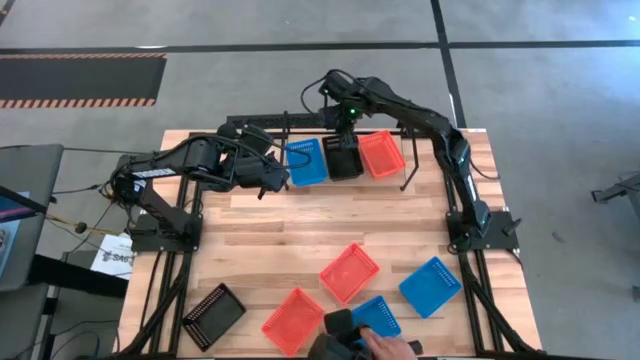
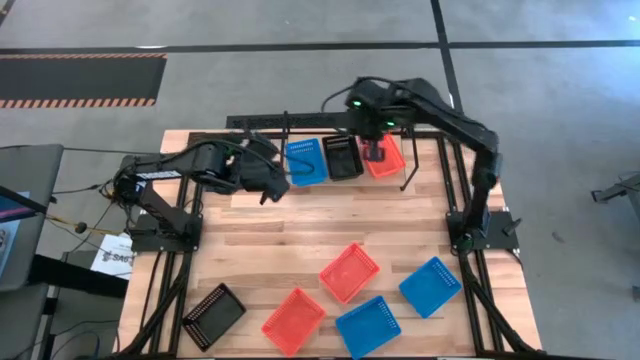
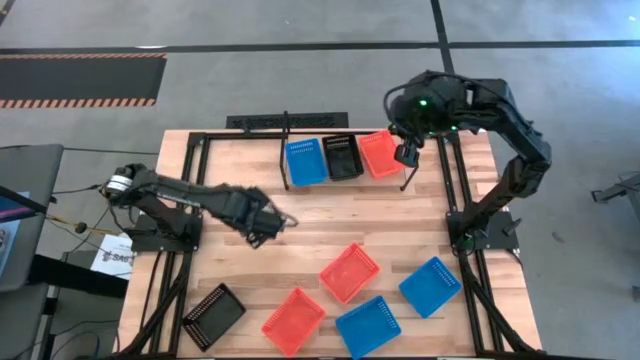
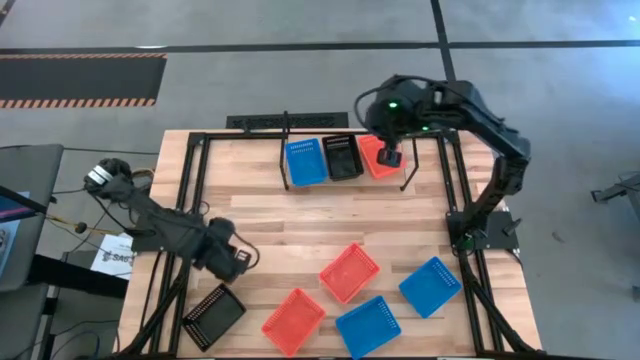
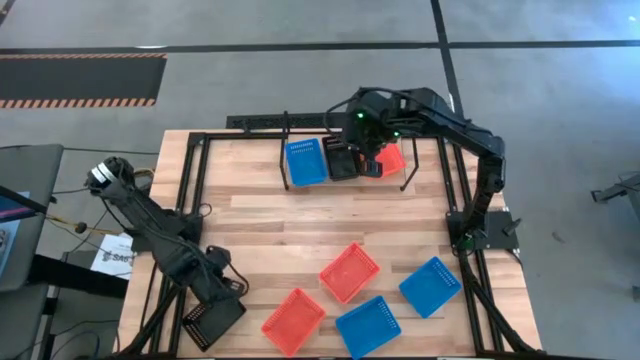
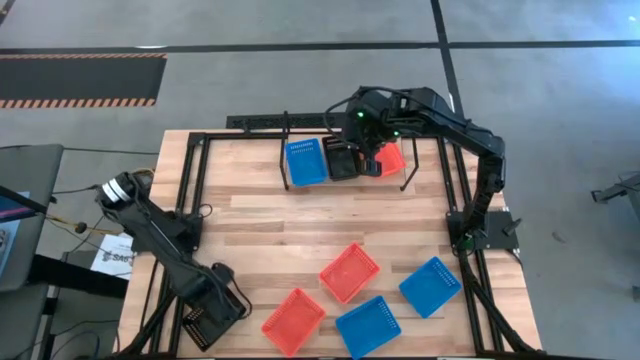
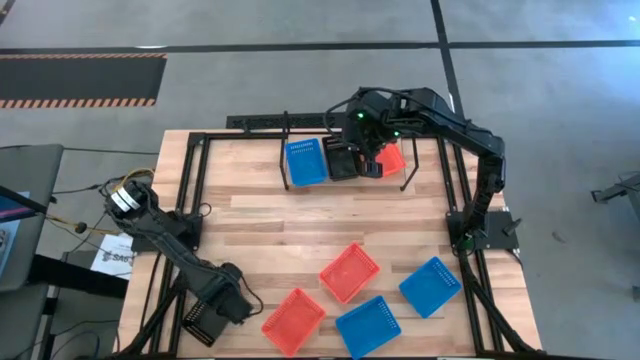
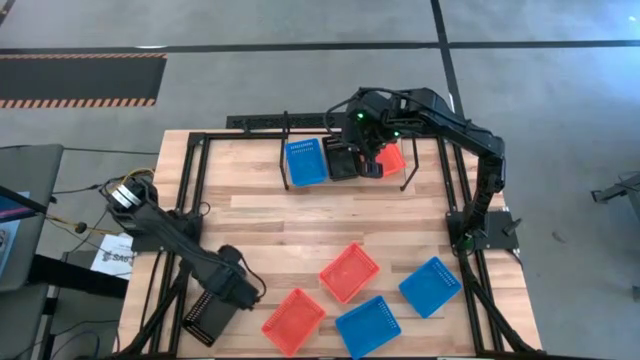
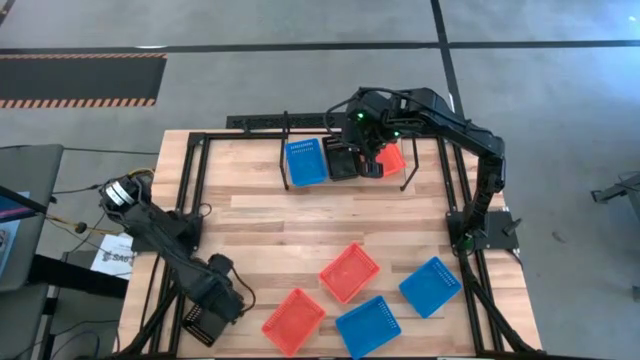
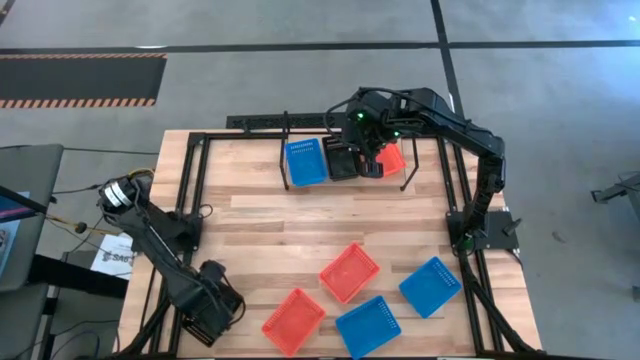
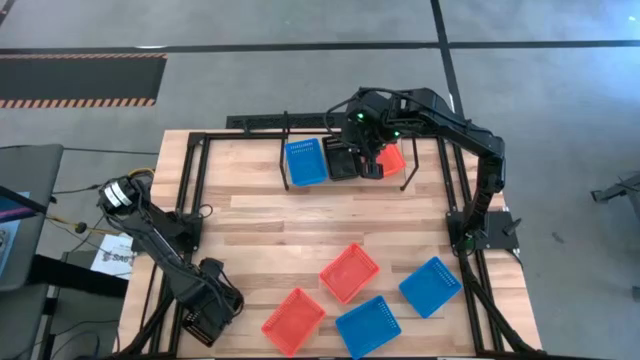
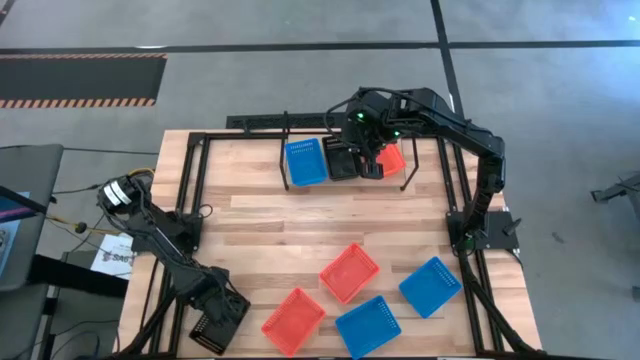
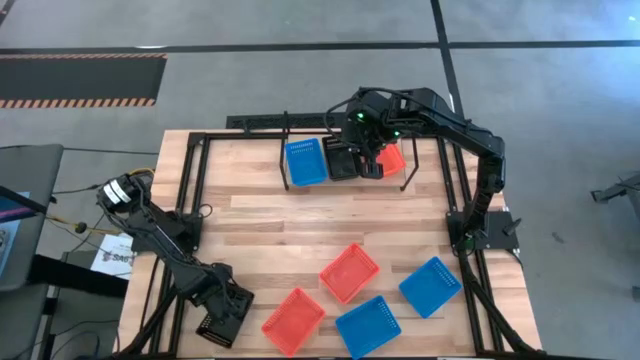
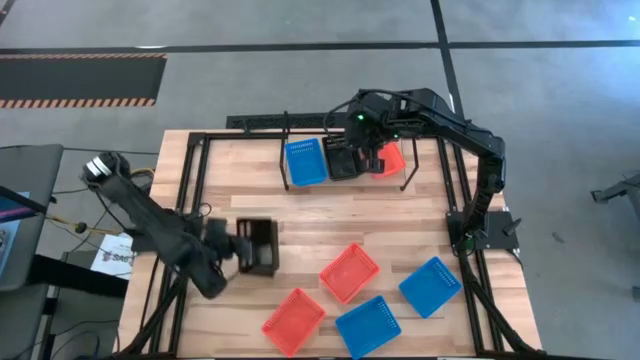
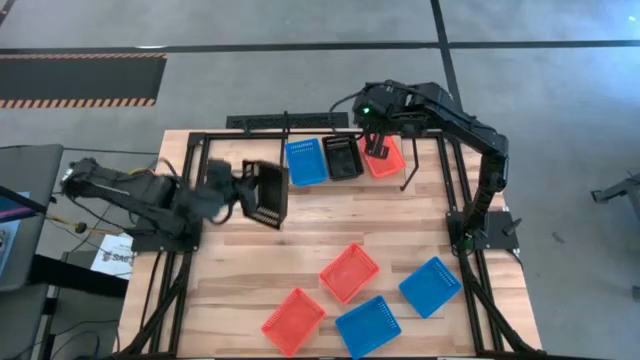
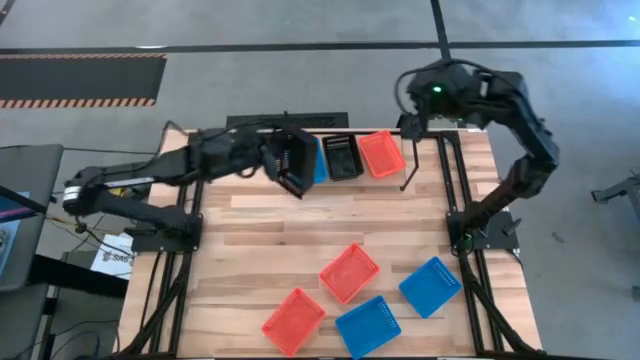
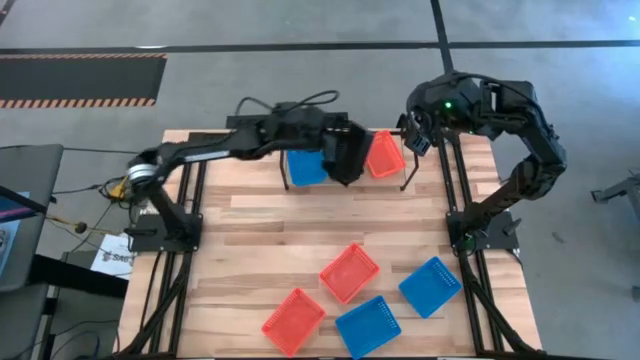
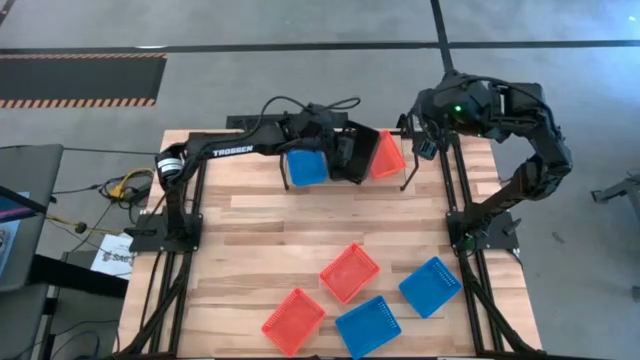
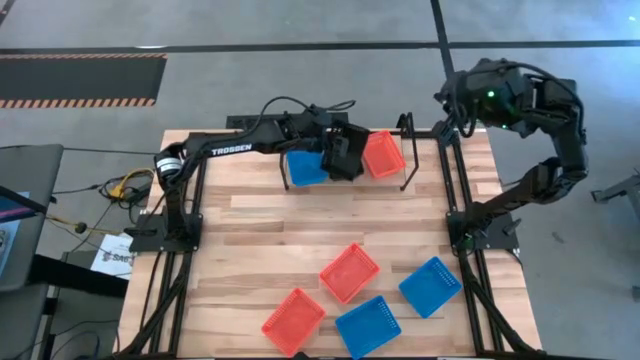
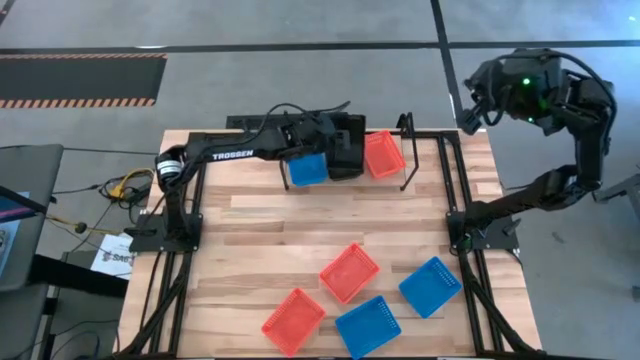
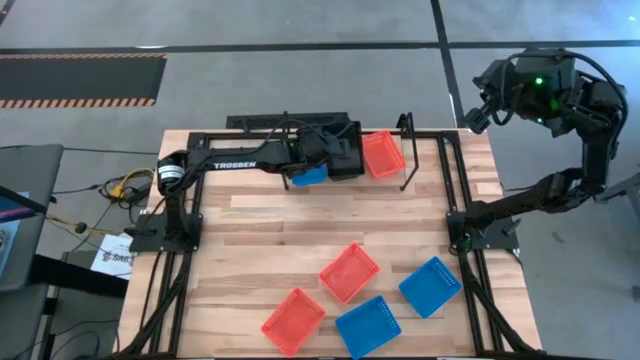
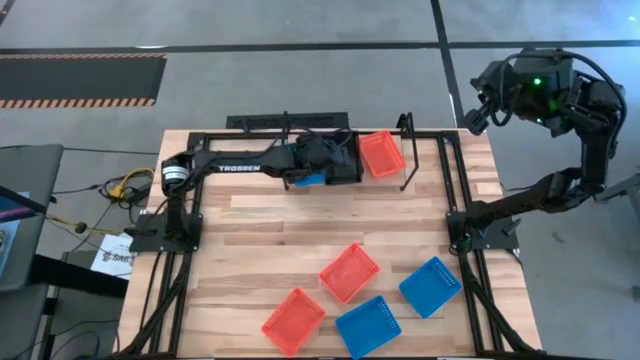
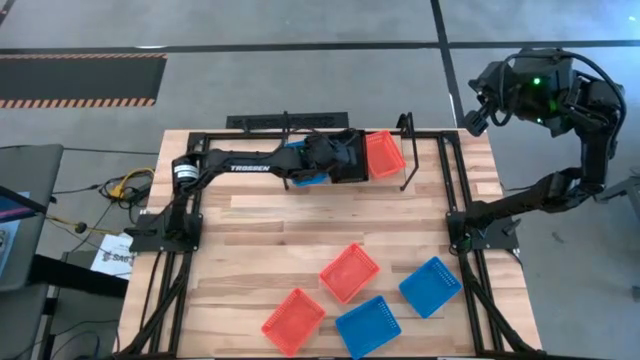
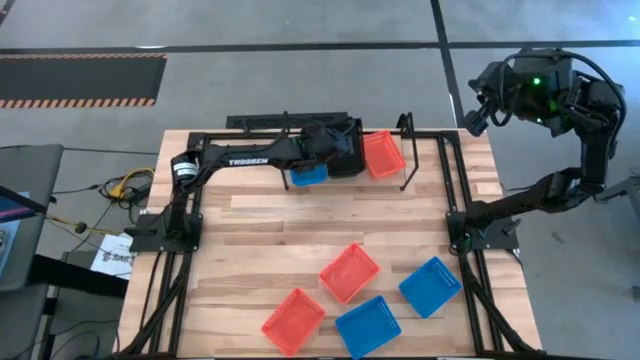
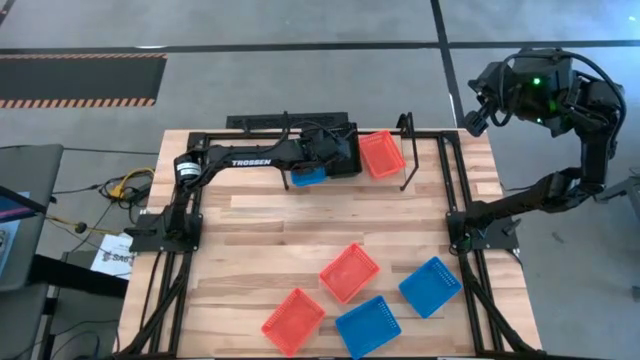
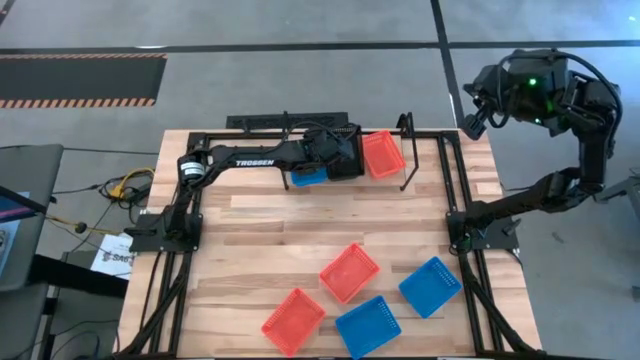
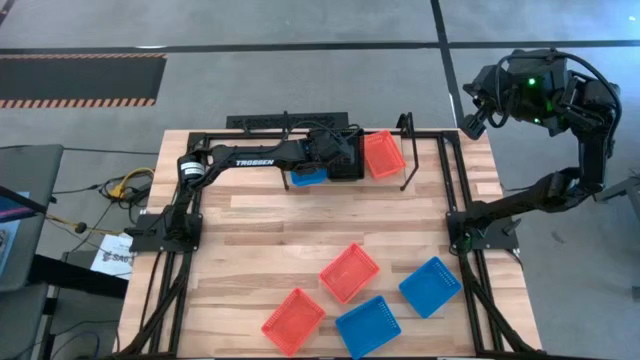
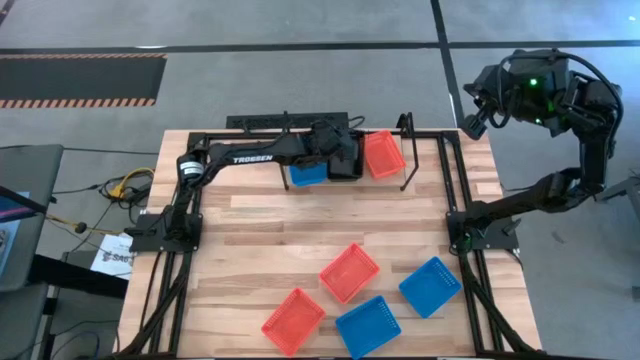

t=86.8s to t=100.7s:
Task: Stack baskets on shelf by color
Stack the black bin on top of the black bin on the shelf

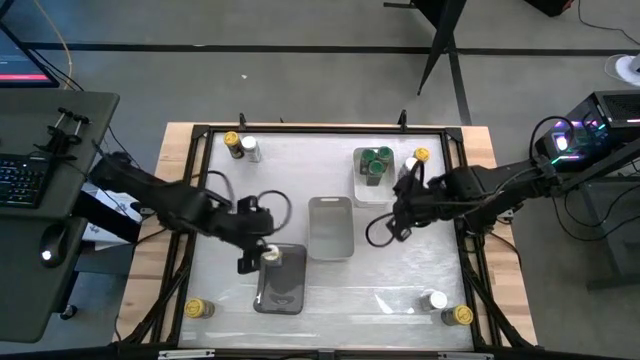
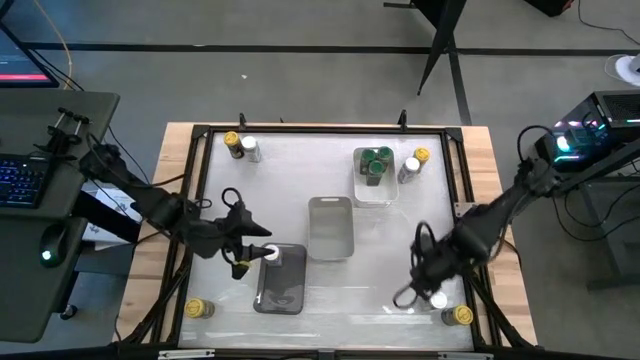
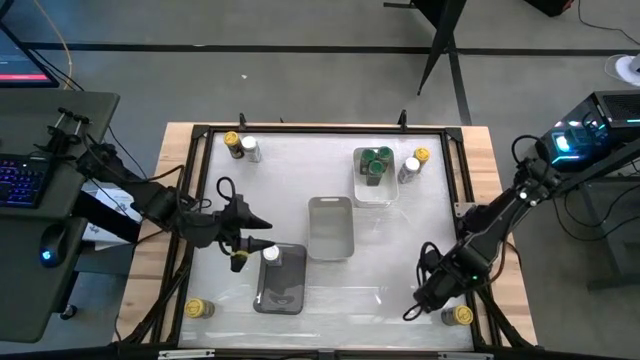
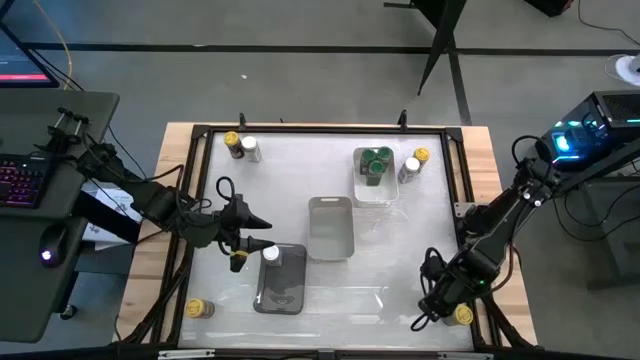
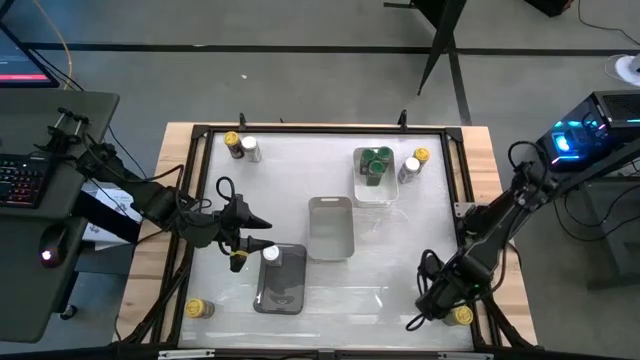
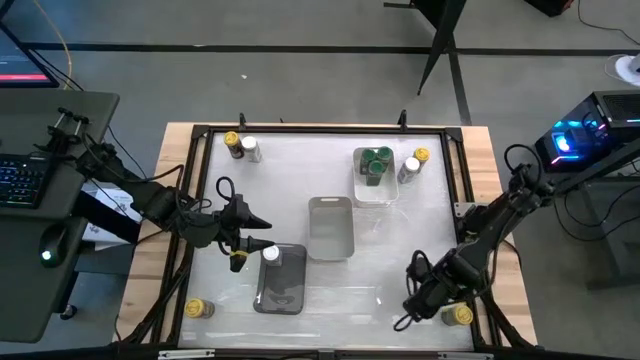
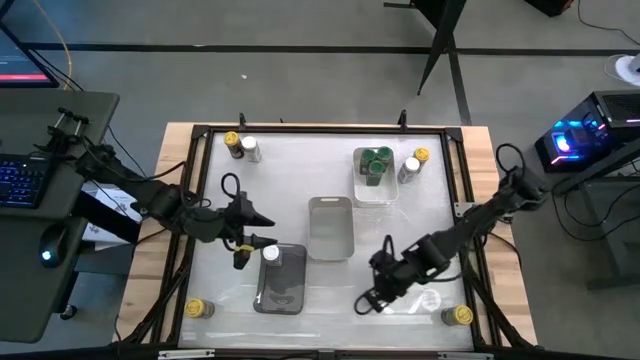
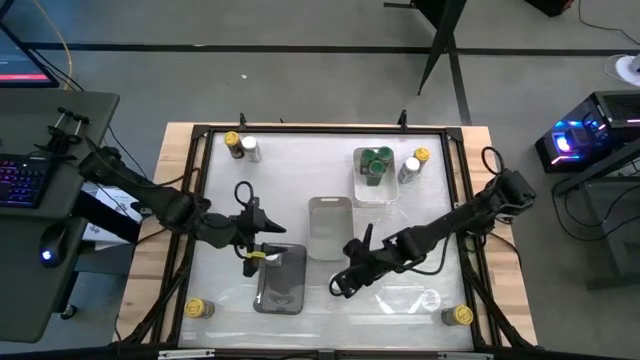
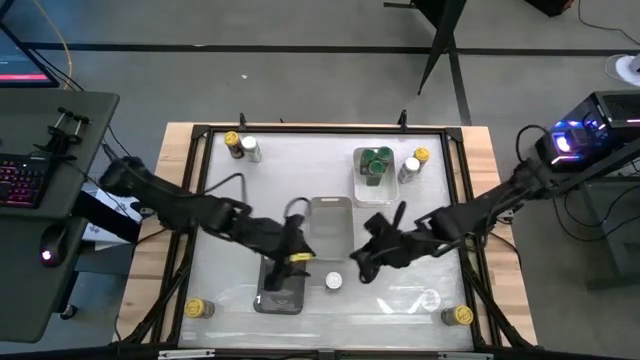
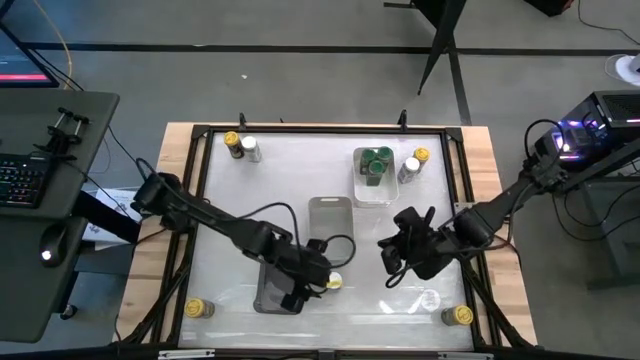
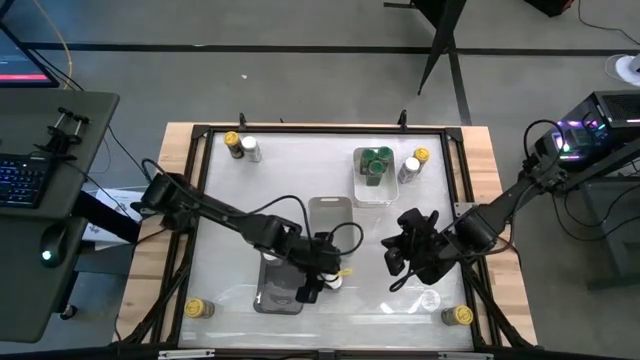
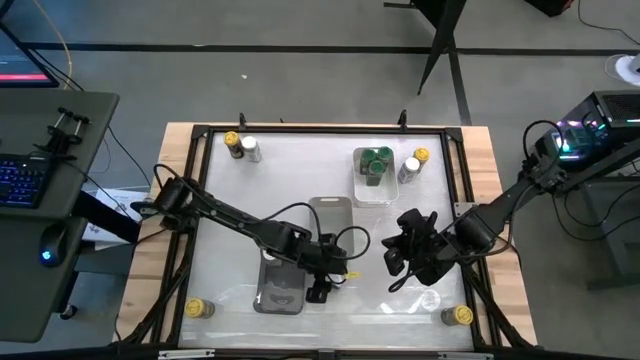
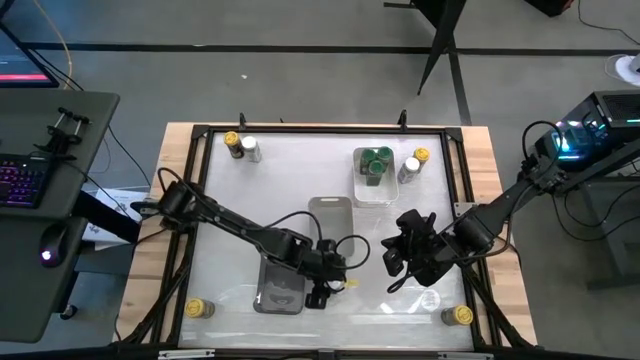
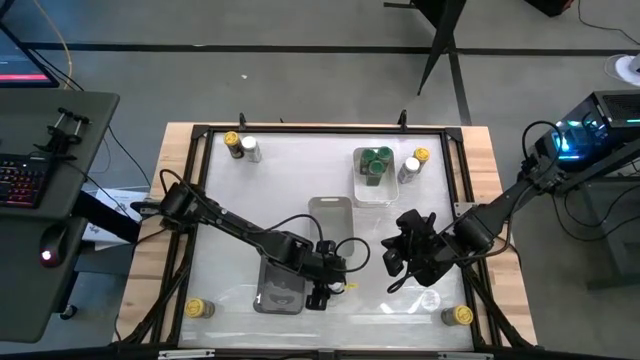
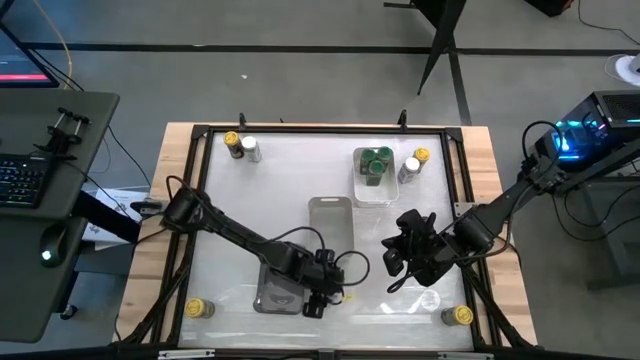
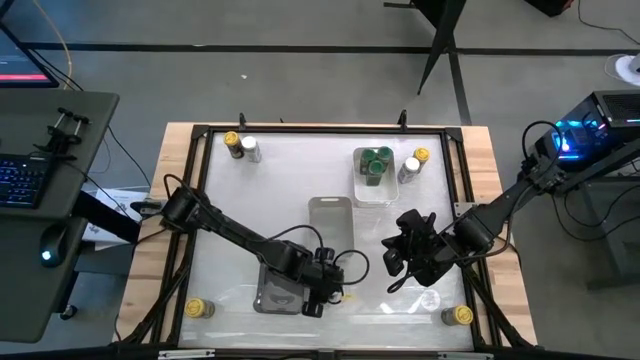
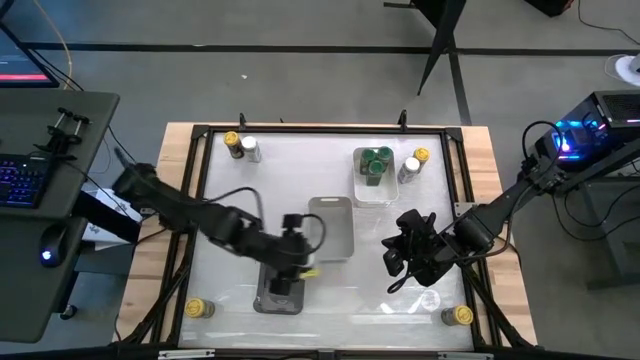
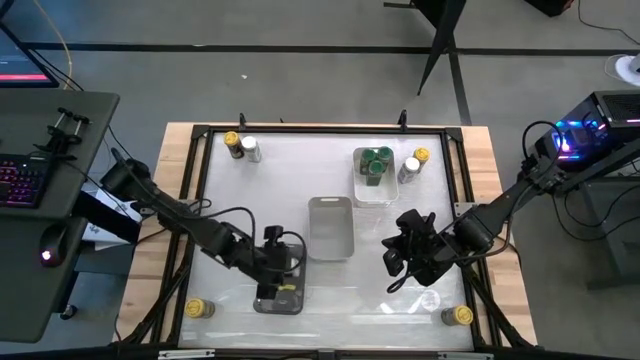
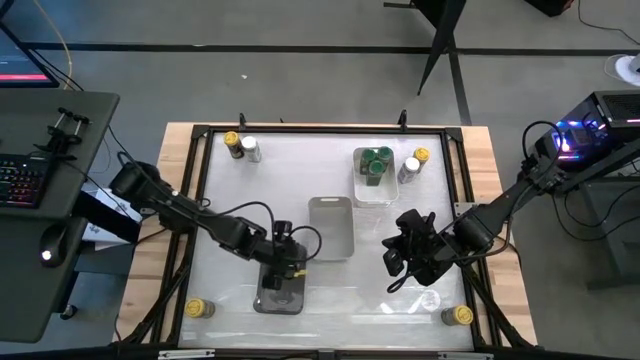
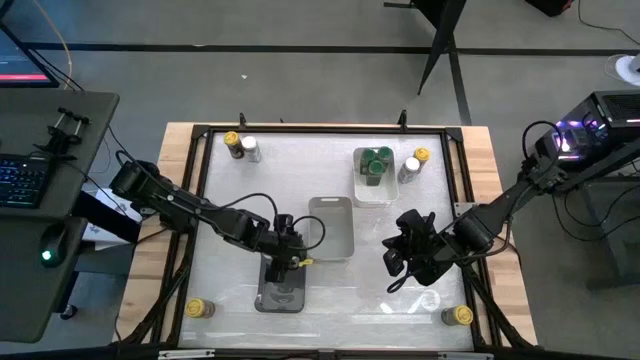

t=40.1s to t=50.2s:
Task: Sort spices by type
Put the white seasoning bottle into the black bin
